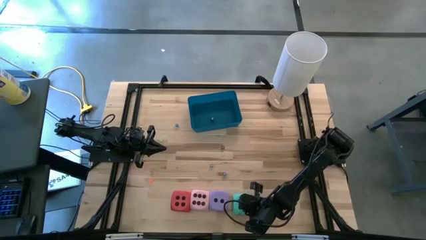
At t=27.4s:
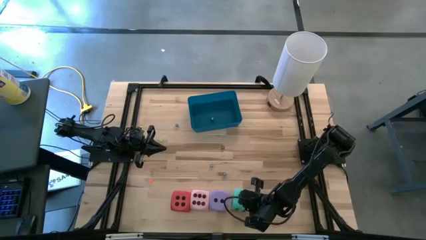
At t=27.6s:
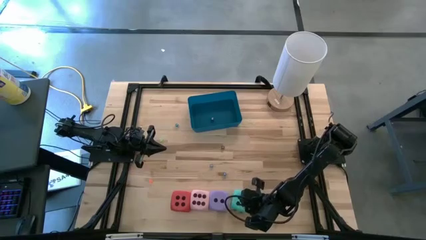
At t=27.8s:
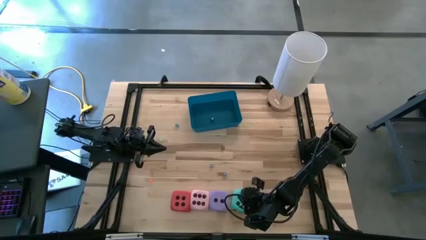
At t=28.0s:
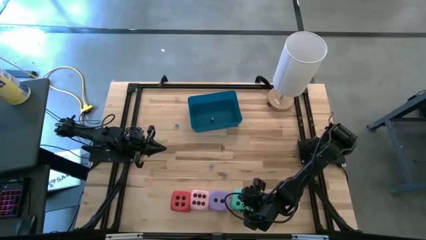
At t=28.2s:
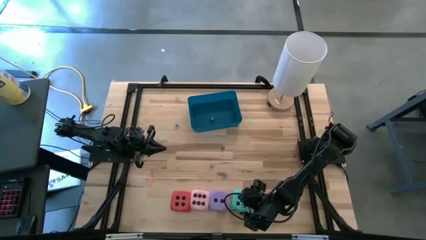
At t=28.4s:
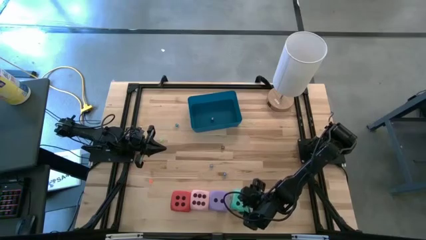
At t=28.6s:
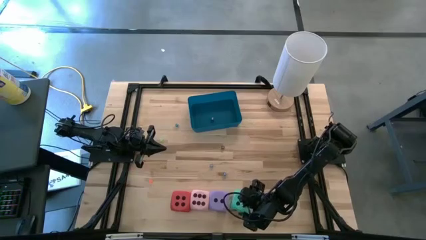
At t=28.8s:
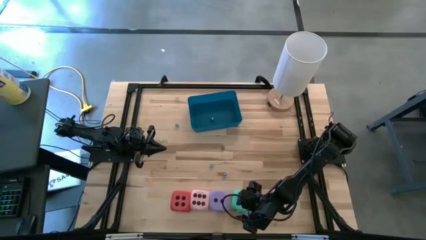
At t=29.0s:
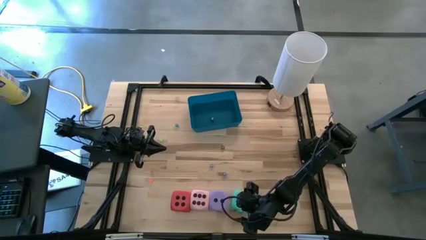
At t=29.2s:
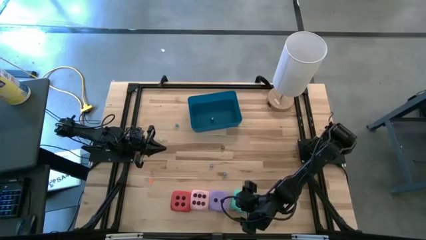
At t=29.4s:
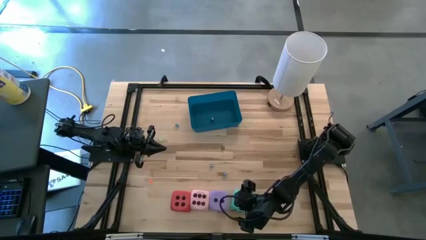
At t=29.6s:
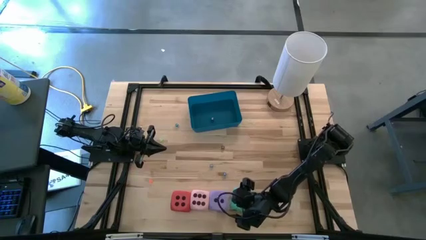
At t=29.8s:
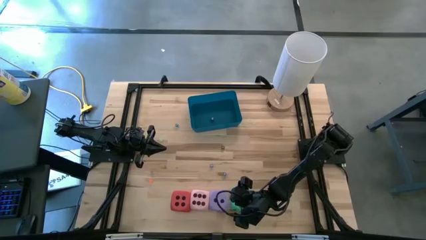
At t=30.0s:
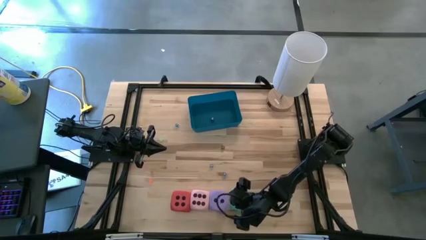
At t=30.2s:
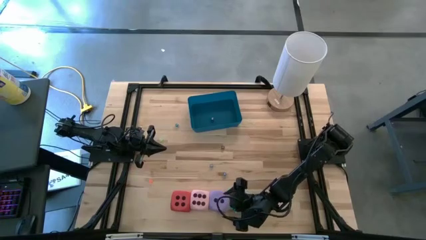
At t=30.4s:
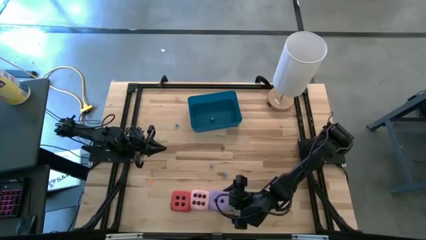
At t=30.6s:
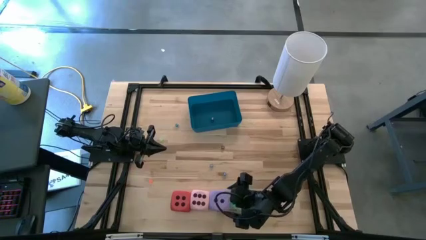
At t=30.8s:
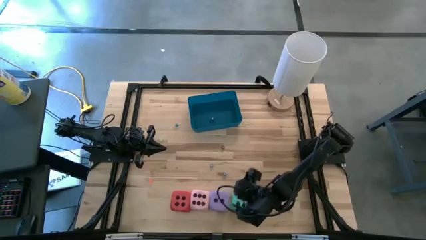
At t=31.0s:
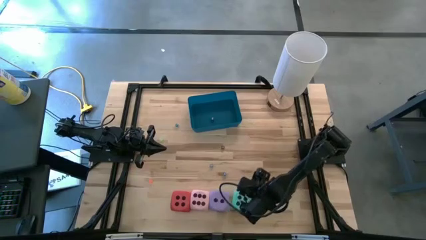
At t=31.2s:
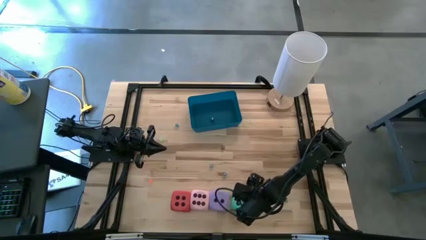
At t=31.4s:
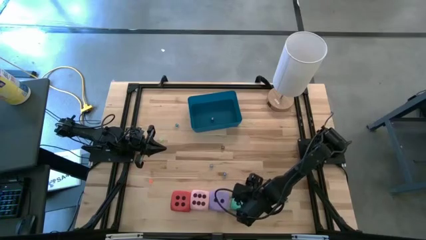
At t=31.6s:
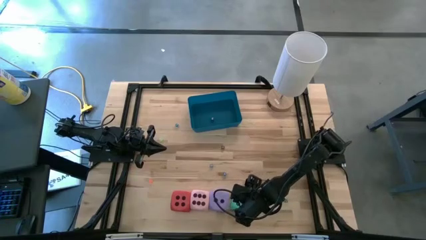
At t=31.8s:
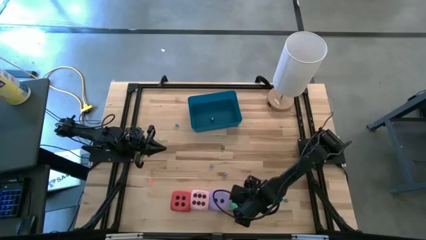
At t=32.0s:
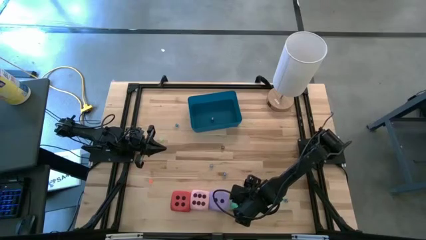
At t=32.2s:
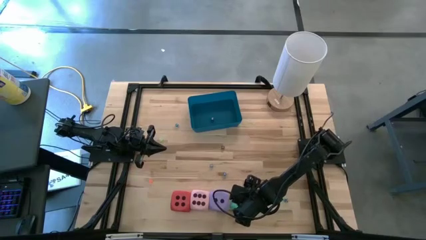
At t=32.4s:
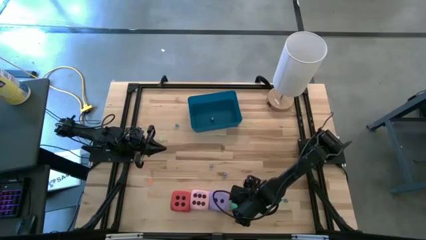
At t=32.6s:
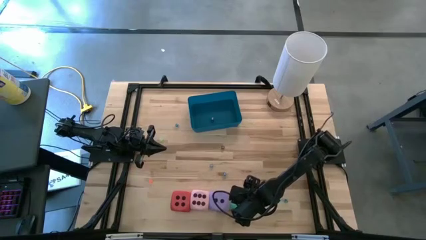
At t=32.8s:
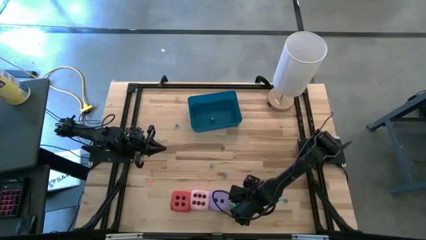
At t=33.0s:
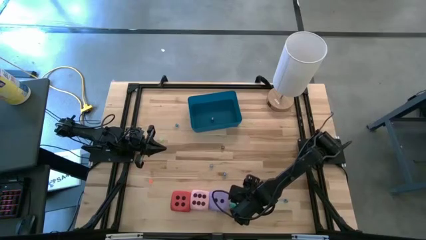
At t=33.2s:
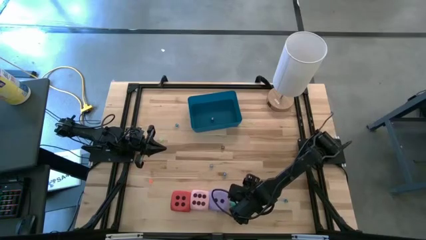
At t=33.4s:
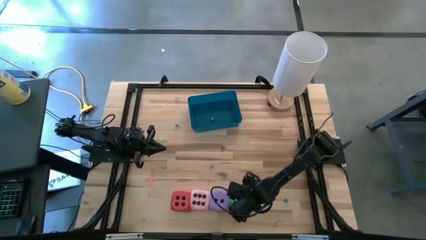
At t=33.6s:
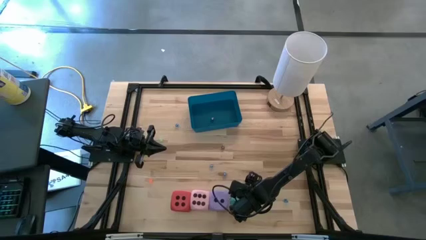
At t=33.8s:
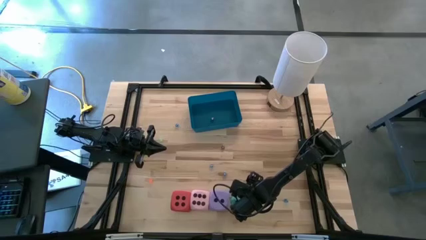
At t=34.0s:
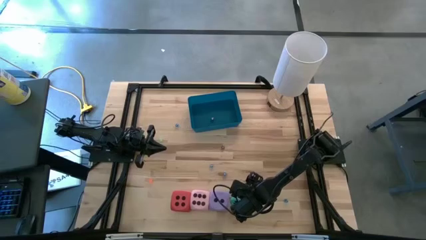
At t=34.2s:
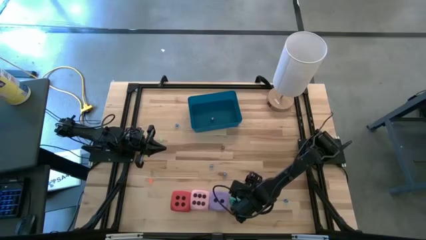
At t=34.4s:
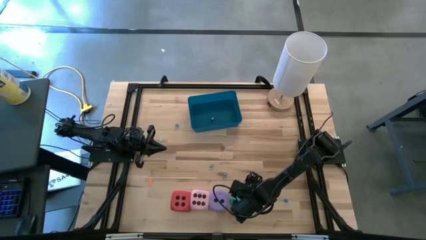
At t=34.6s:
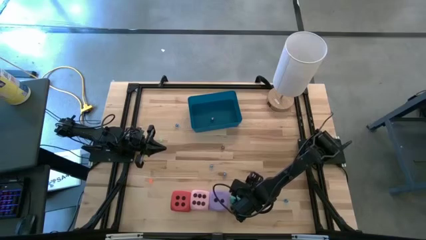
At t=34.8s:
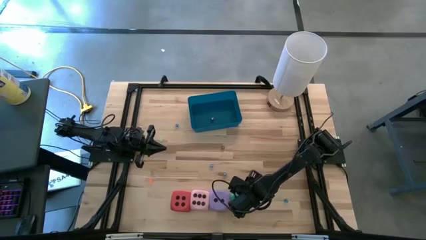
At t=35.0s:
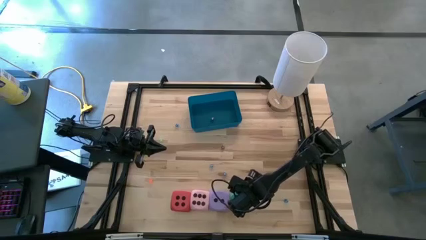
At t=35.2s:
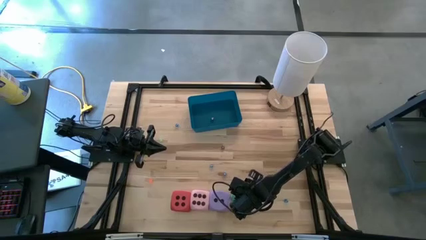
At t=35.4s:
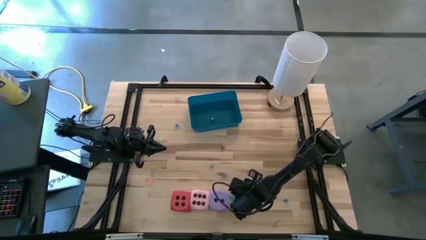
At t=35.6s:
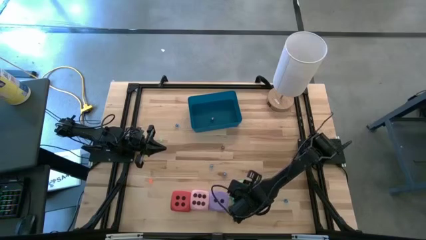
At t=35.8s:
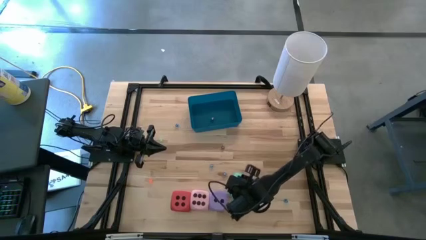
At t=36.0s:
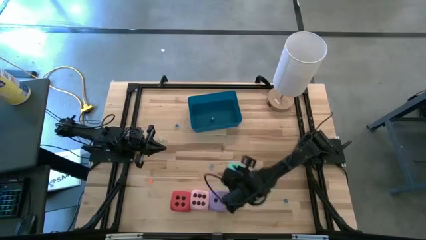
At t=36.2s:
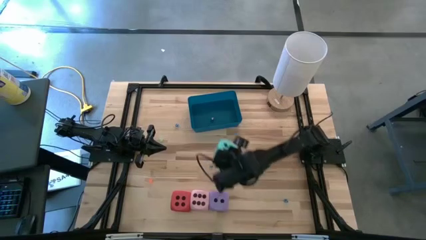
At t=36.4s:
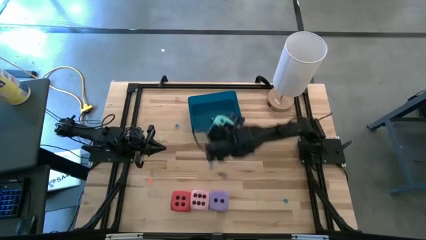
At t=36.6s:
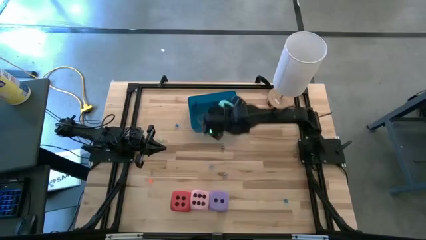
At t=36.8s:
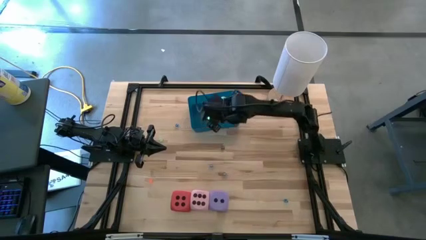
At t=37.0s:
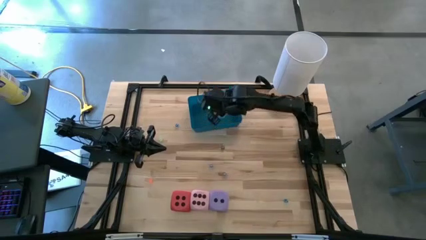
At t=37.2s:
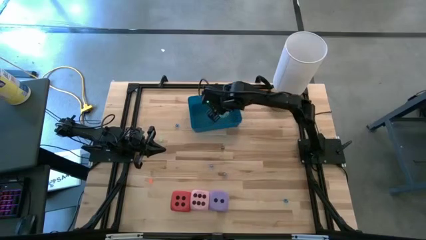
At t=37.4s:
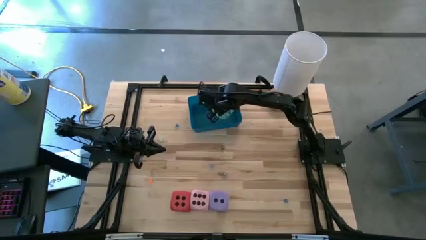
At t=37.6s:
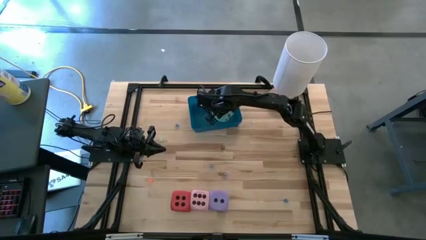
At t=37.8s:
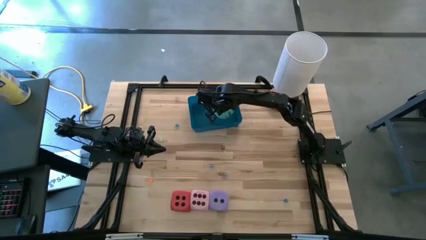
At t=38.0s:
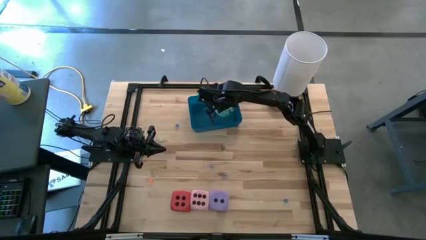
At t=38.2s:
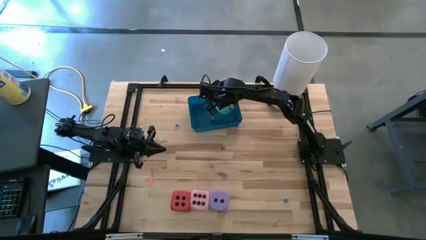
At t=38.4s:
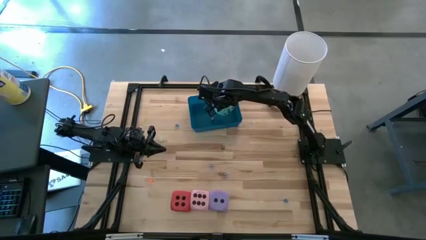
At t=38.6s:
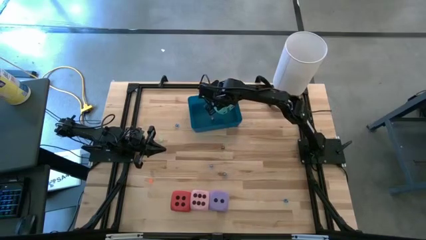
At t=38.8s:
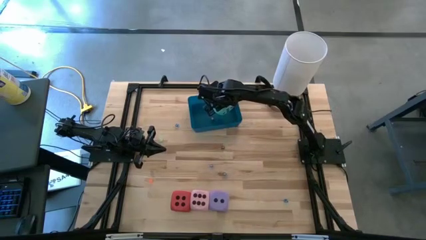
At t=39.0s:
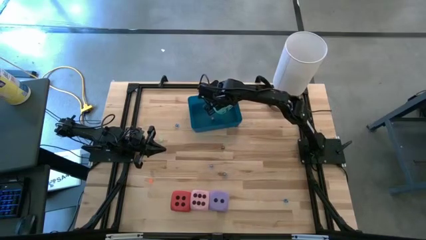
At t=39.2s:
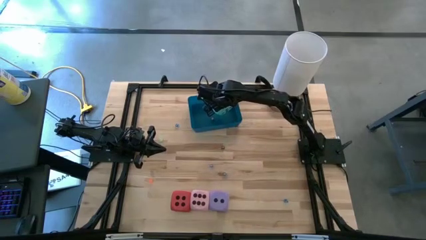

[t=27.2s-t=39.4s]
Task: Pick & Place Dice
Put the large blue dice into the blue bin
